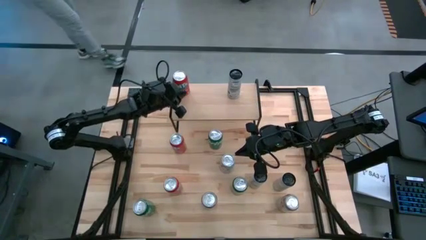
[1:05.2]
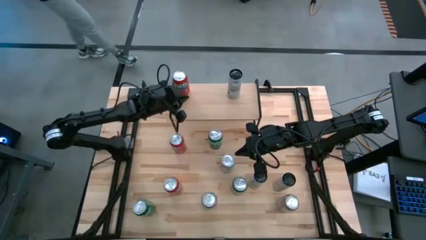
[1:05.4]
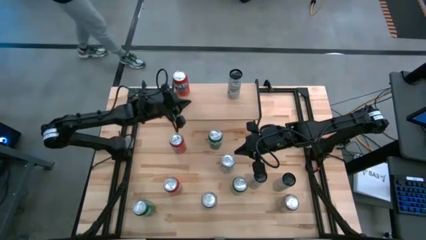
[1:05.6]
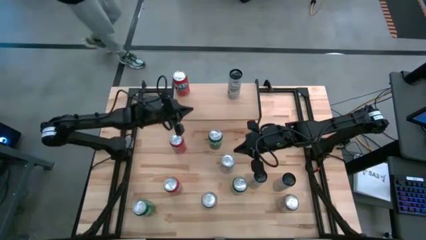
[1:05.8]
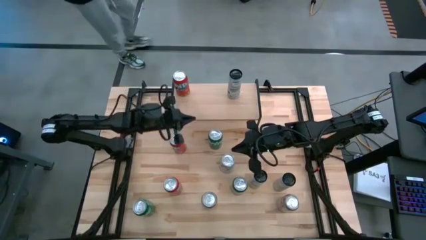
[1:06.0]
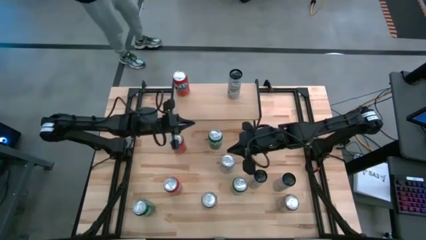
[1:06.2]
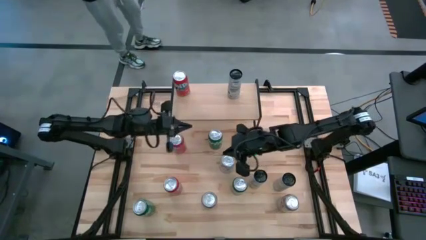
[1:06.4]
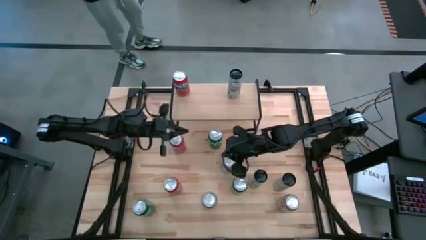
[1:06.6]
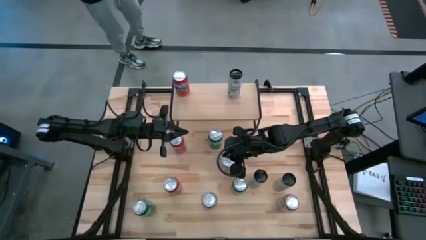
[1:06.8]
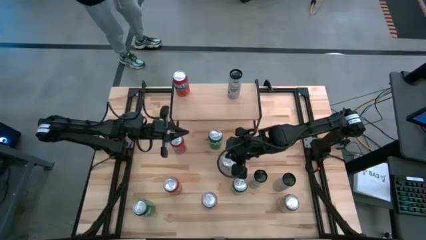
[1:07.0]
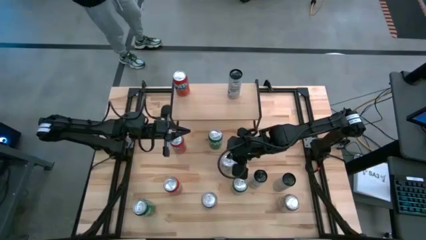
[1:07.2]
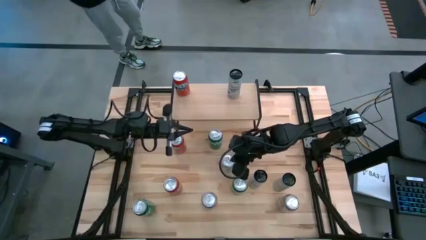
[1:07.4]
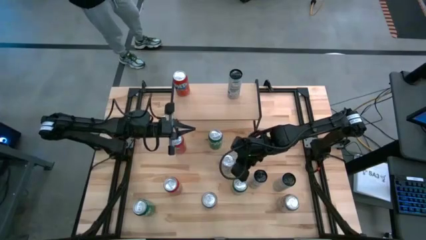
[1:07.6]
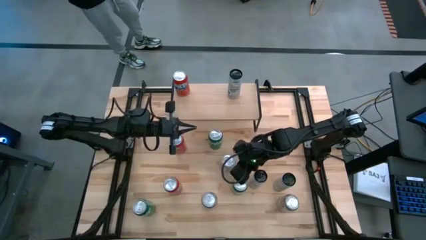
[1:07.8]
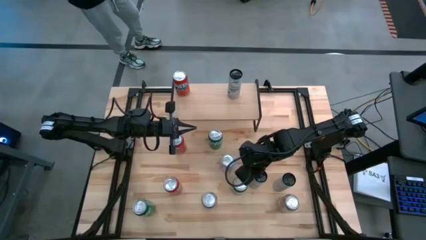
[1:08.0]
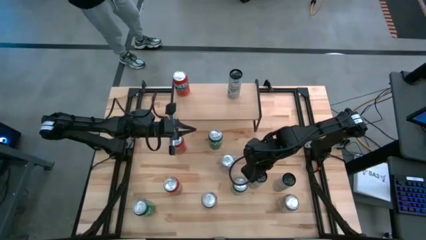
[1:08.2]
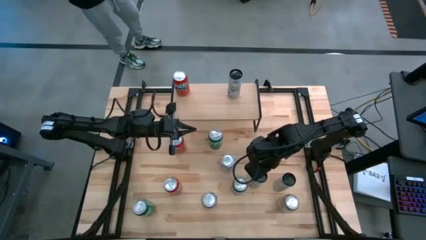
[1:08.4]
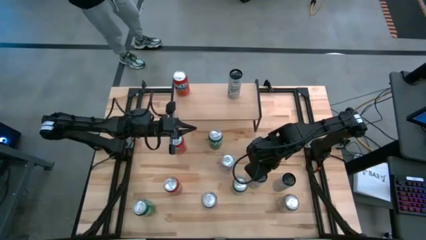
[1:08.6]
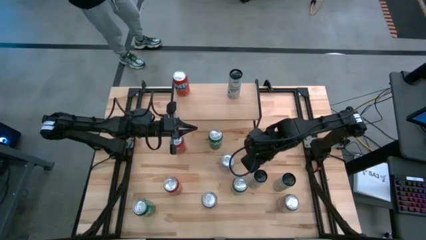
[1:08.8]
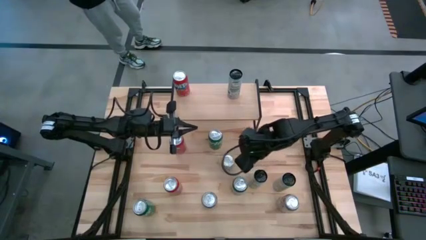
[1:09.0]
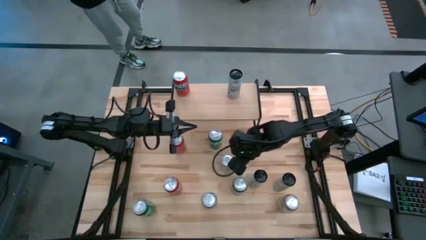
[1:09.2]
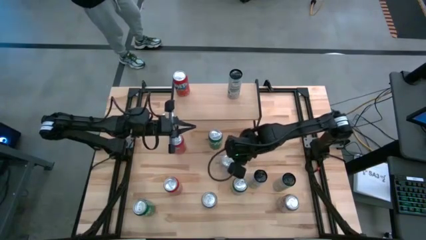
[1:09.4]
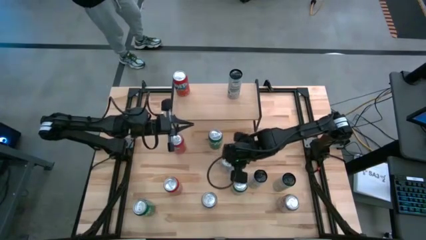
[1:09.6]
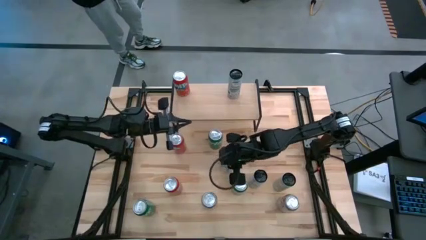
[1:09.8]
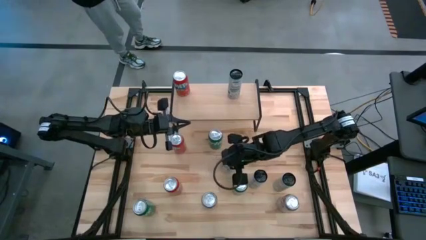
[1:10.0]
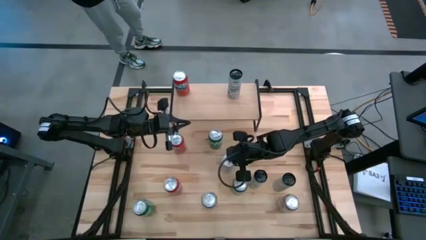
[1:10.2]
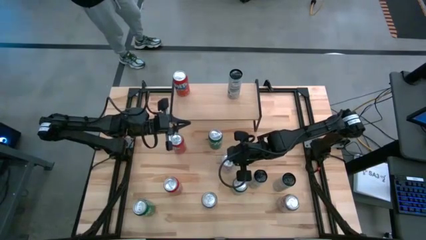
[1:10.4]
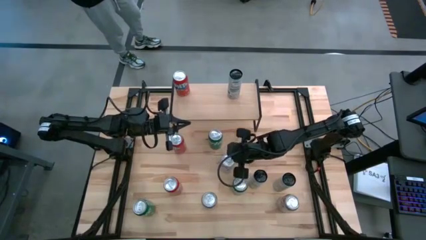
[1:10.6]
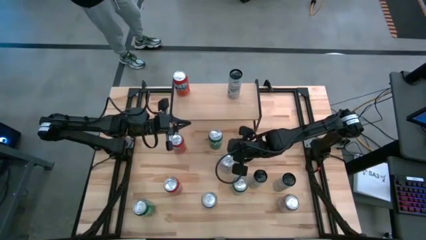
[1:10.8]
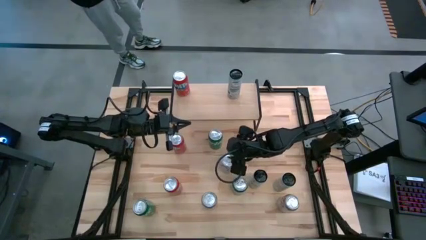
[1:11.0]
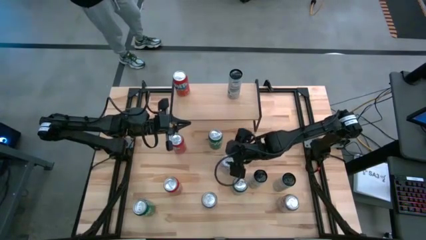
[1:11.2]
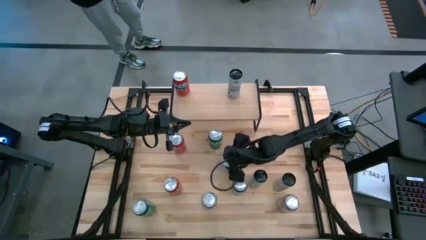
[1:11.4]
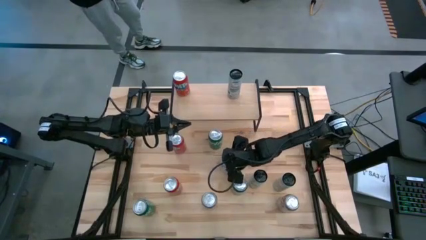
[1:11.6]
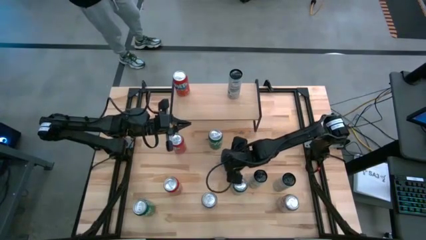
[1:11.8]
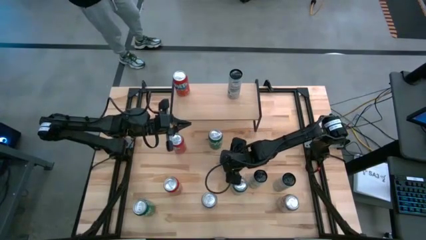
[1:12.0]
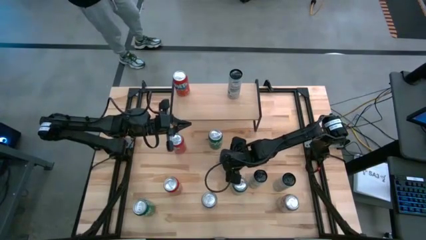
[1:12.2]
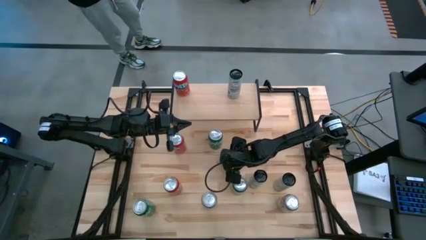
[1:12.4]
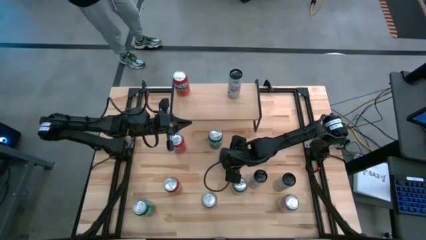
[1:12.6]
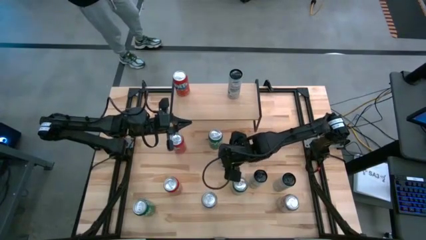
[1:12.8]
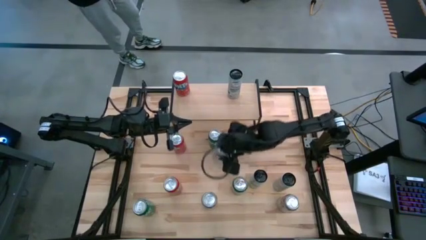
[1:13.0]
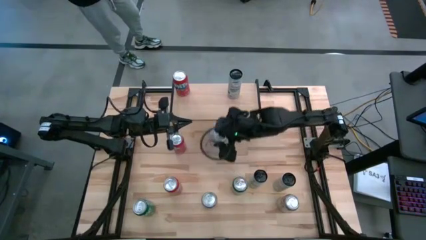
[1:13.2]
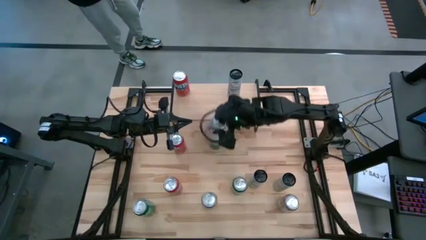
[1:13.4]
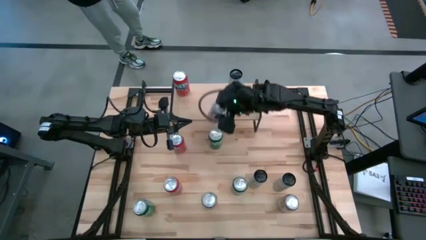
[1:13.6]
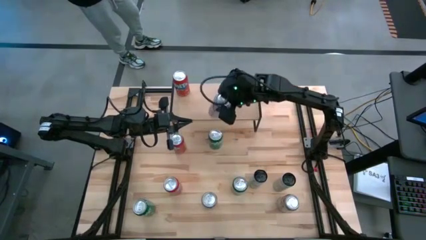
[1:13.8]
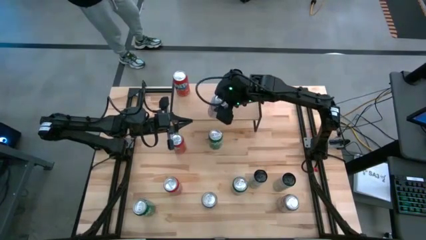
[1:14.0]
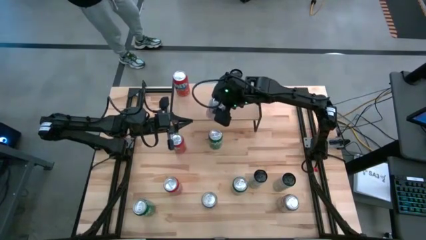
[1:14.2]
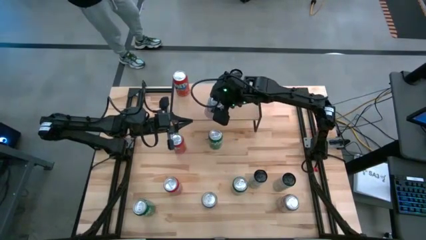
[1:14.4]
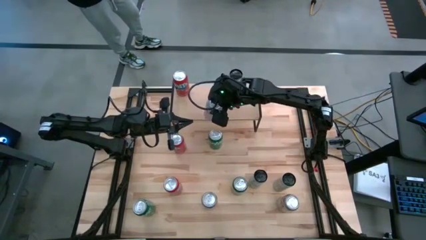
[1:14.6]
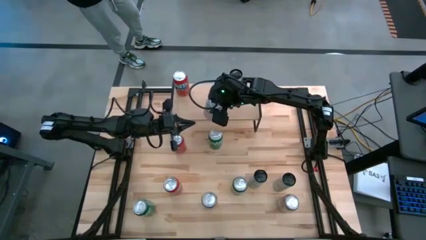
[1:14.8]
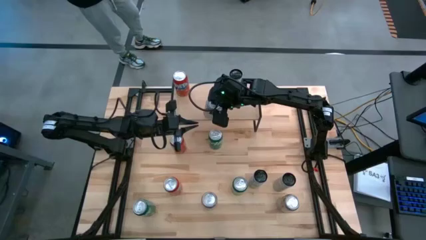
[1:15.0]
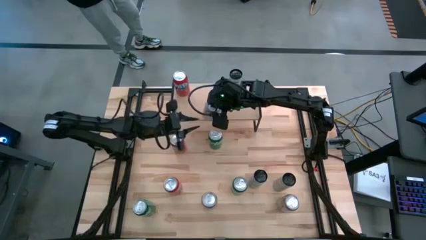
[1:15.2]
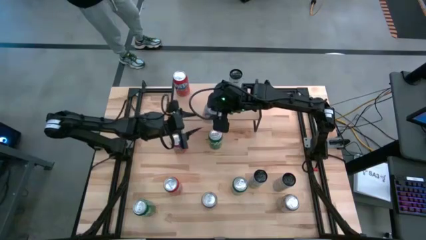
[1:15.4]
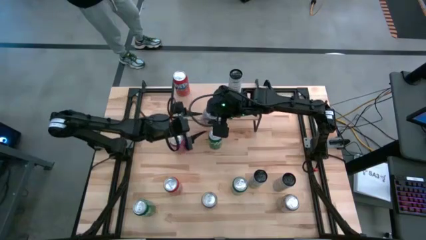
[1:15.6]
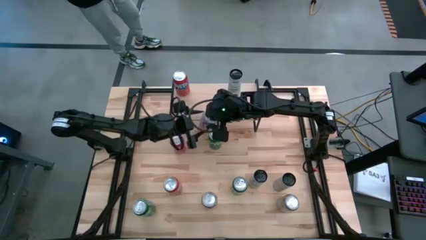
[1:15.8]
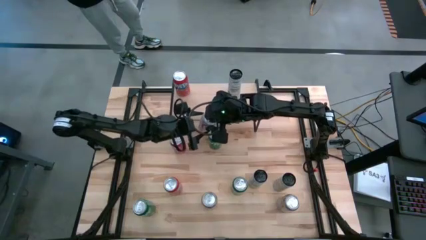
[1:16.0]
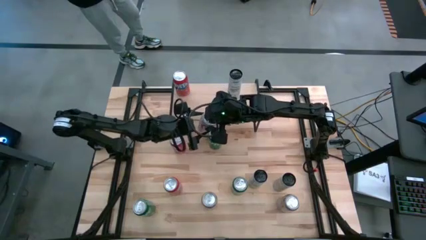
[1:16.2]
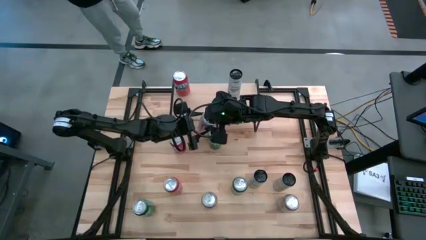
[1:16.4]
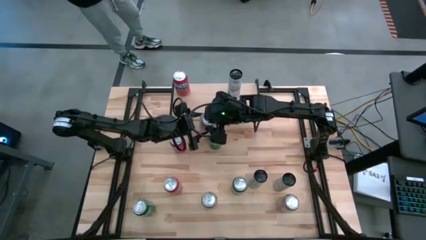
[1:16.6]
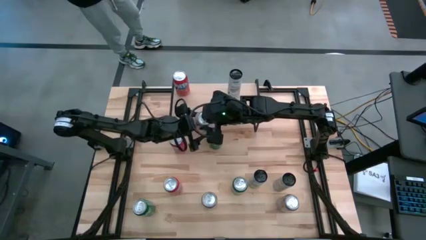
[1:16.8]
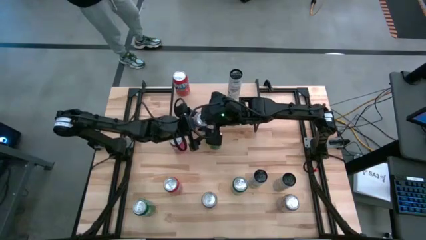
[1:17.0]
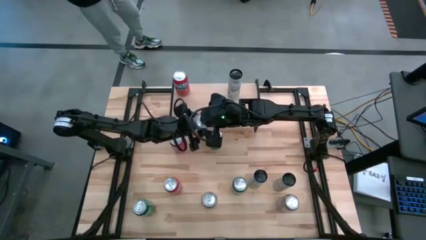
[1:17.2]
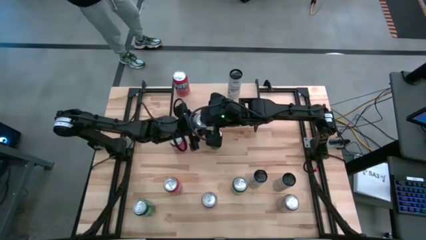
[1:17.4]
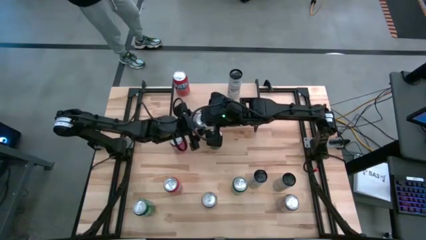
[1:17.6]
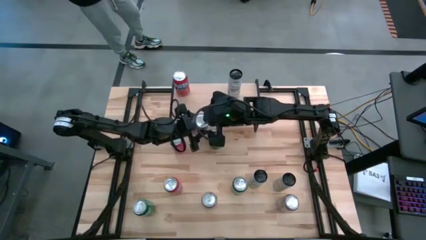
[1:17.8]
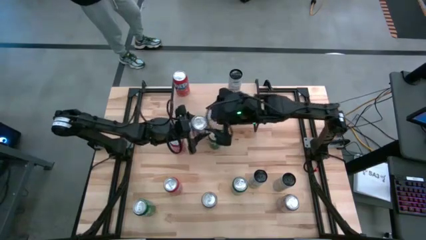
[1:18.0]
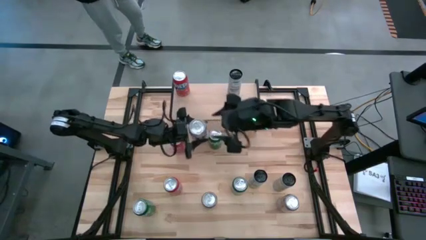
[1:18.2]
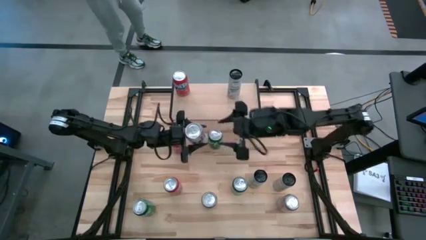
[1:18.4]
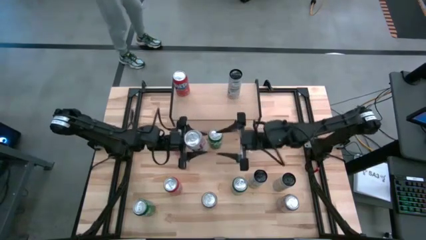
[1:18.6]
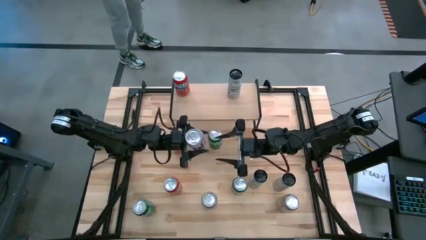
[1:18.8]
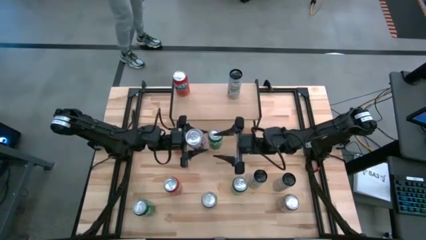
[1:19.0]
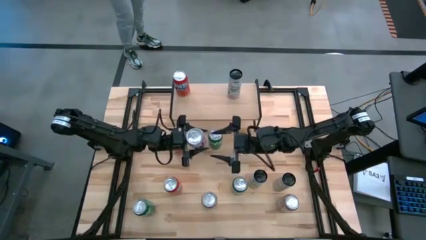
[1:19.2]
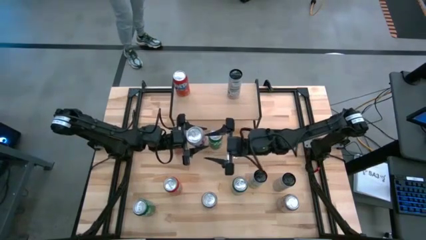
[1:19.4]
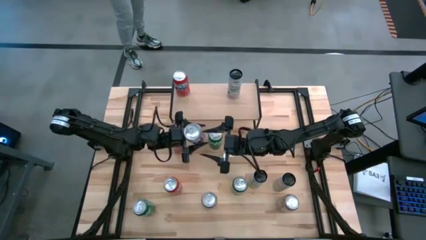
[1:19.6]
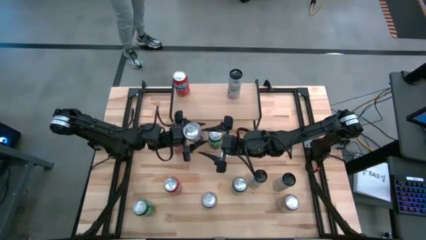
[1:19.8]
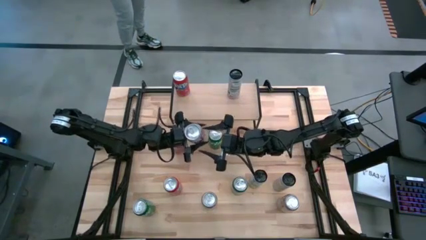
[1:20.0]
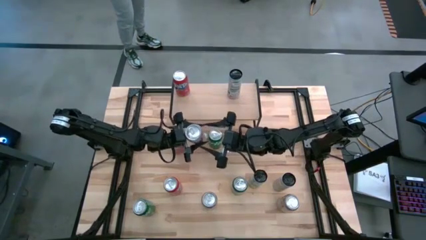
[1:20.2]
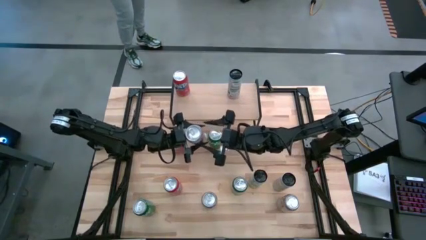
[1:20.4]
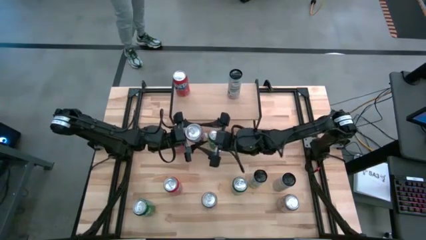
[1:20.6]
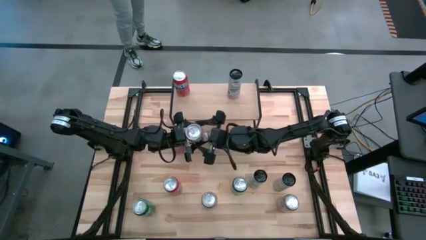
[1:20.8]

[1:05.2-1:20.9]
Task: Place canned beverage on shelf
Put the silver soda can on the shelf
